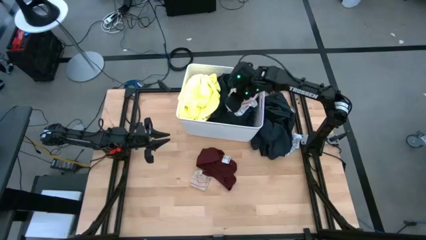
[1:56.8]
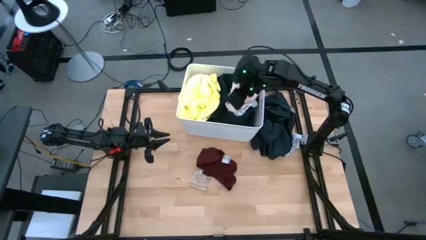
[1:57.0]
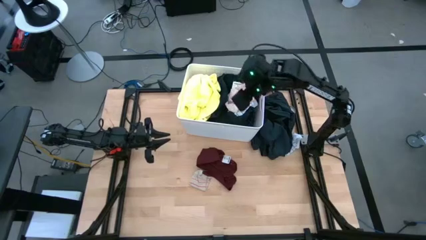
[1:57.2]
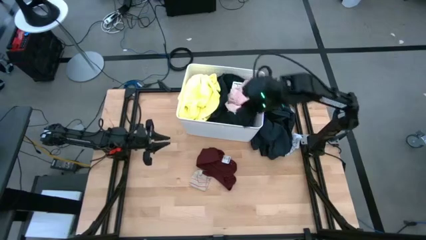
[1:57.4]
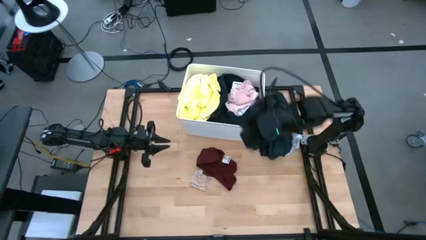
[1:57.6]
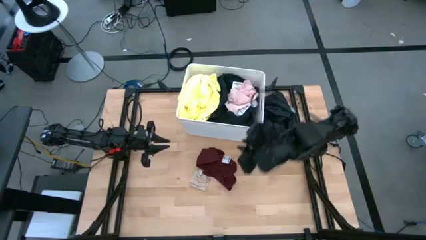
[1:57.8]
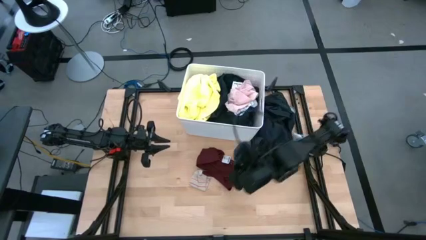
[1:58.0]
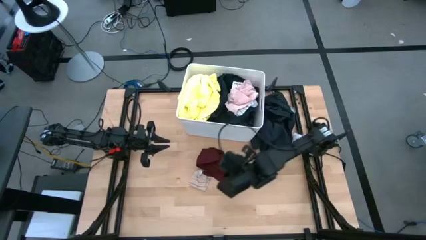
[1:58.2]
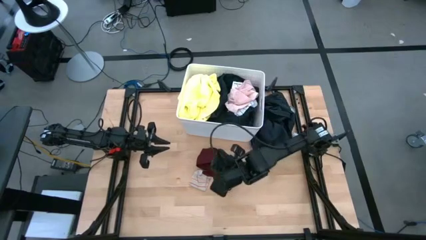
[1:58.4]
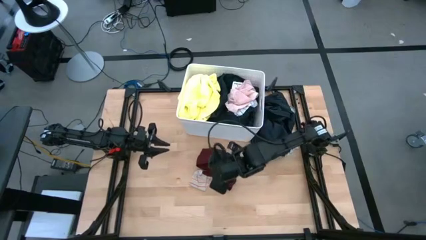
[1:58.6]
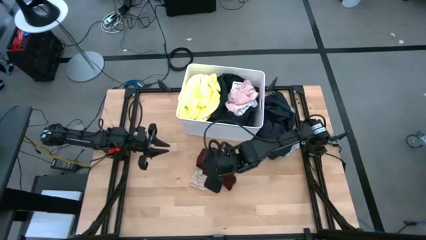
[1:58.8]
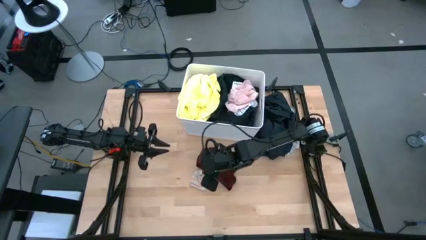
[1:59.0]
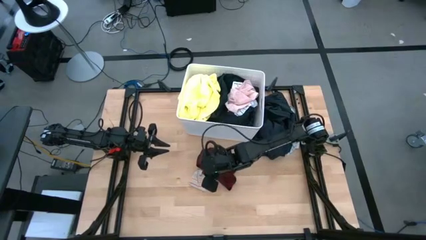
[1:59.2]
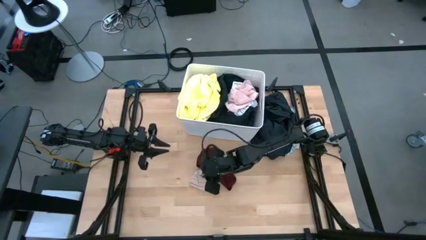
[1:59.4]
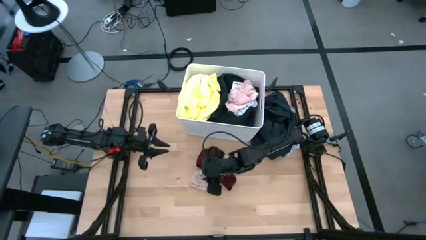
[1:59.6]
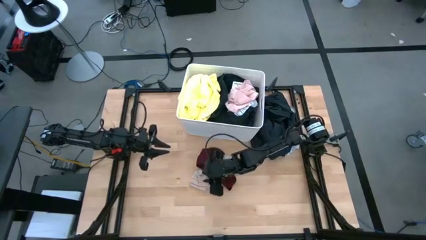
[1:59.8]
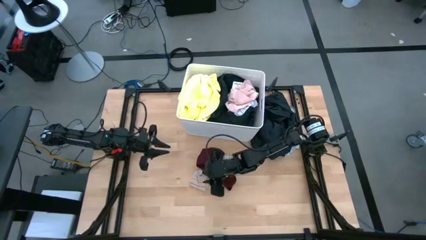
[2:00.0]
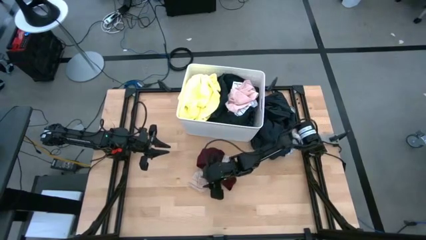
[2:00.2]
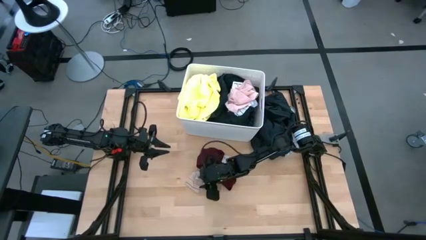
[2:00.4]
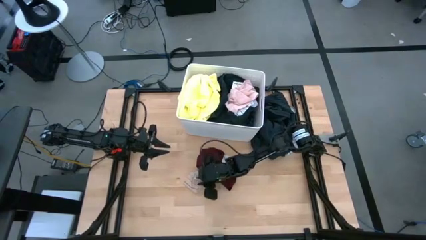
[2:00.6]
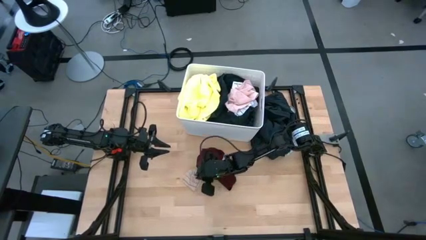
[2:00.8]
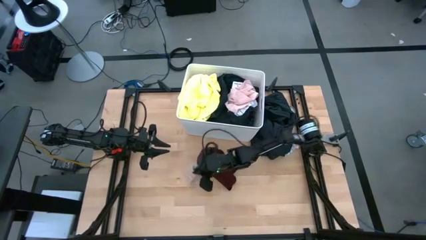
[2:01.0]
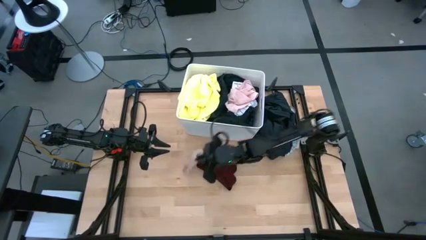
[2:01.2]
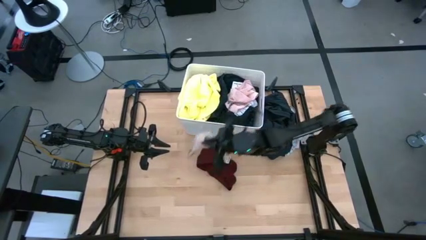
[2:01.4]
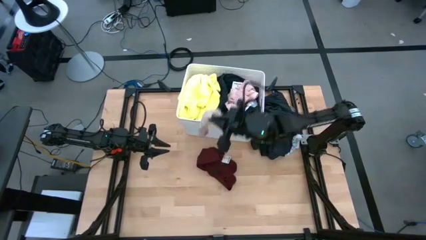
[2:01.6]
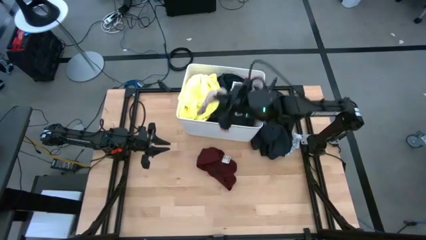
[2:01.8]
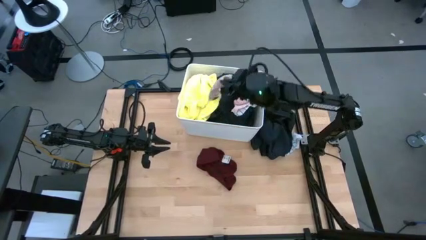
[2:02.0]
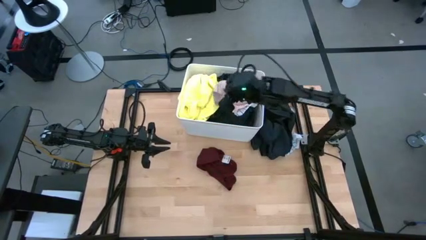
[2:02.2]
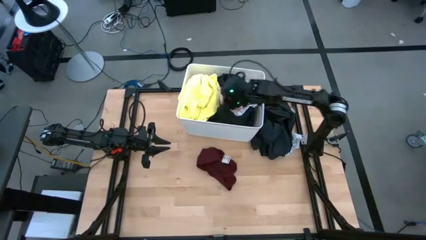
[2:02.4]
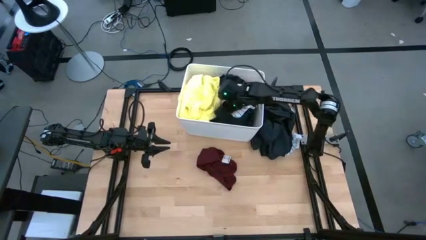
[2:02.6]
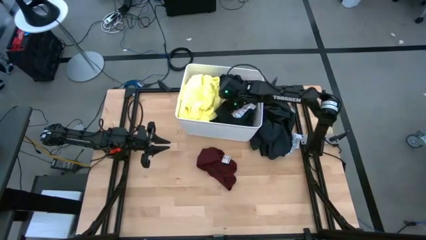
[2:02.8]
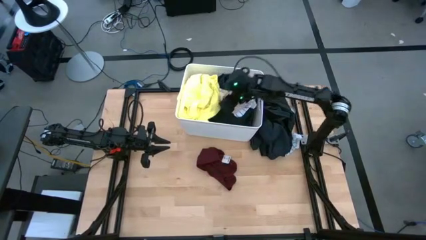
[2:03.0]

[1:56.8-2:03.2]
Task: Sort clothes
Put the white pink sock into the laundry organizer

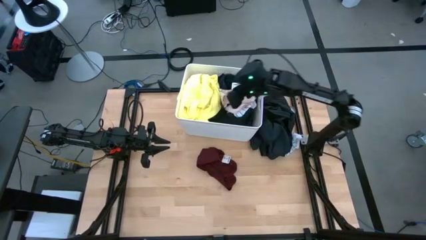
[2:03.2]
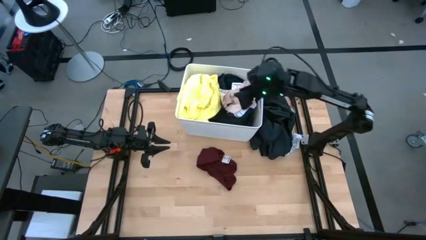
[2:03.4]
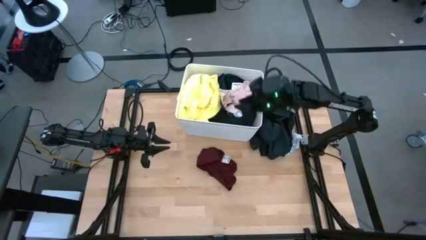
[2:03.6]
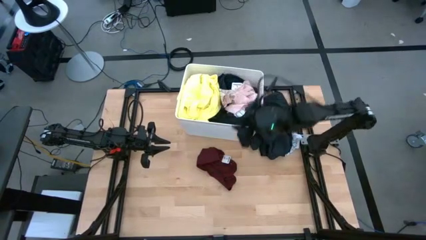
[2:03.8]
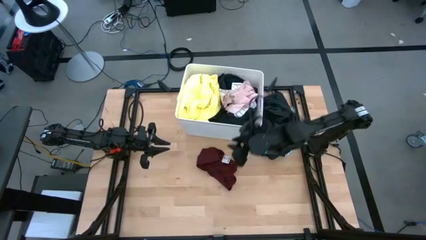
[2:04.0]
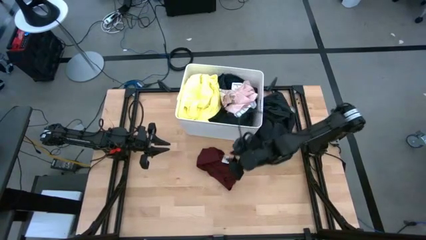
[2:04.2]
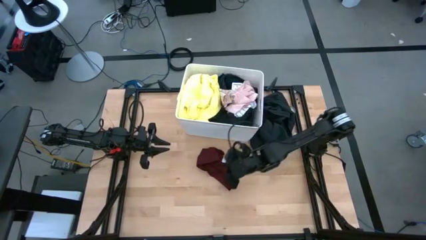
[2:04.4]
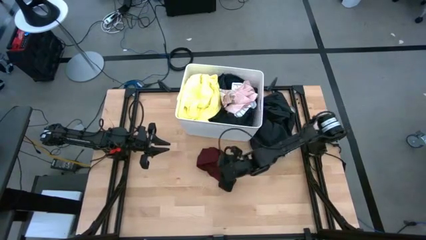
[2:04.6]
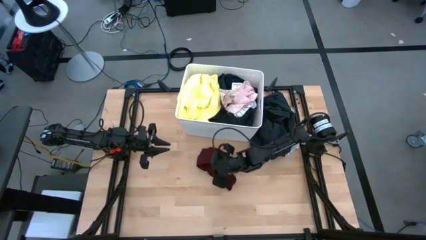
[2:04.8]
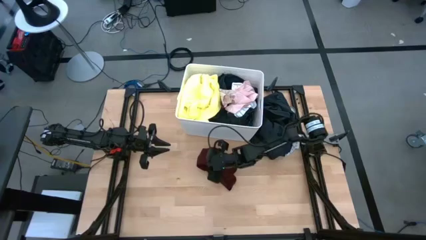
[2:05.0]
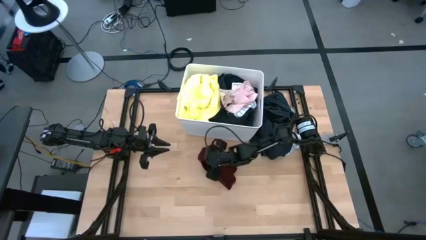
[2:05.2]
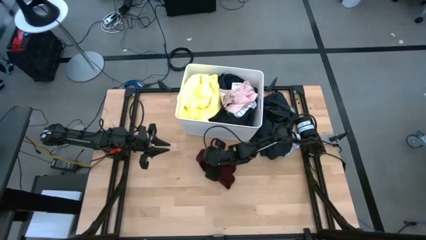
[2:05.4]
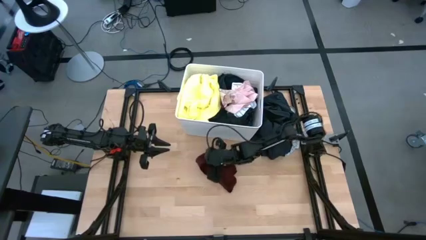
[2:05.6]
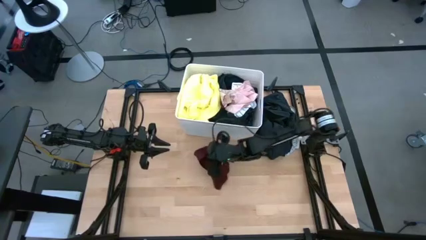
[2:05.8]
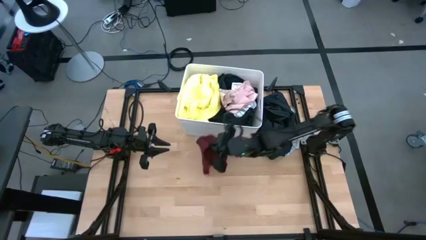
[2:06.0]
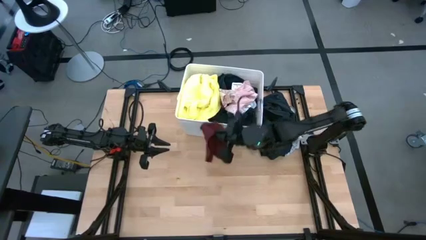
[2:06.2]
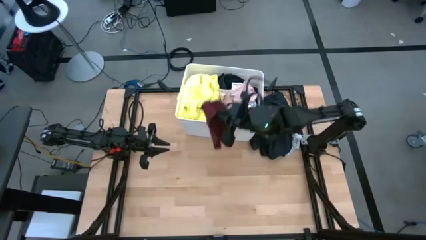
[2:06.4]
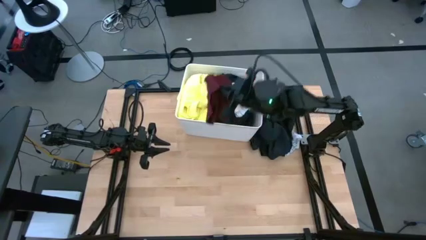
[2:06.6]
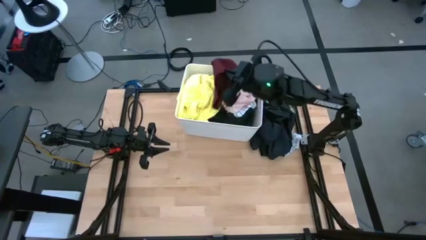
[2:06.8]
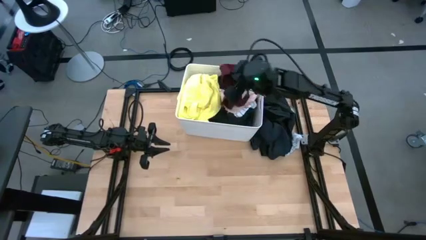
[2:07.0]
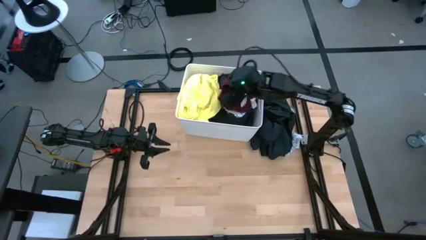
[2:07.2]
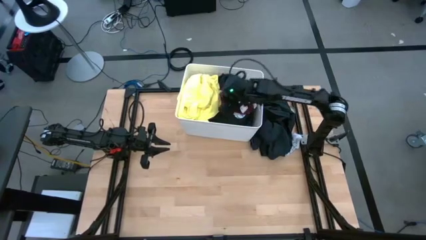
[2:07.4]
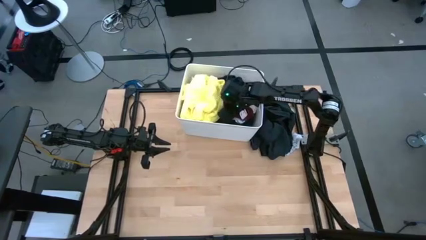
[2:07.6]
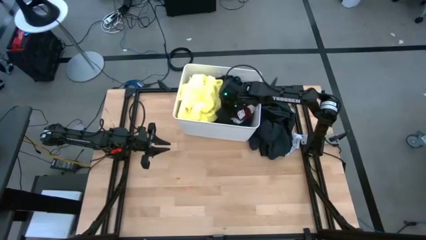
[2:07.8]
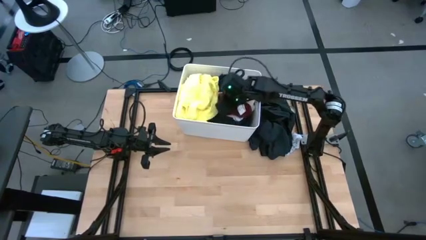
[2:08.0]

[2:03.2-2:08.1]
Put the dark red top into the laundry organizer

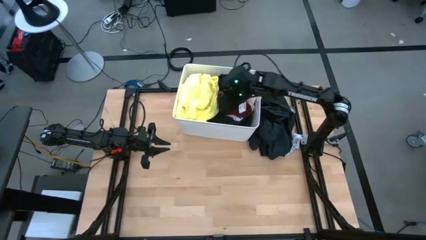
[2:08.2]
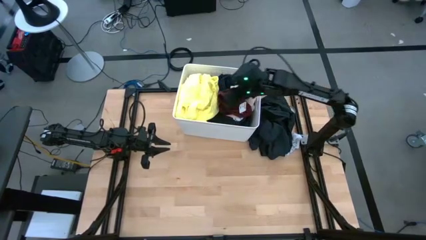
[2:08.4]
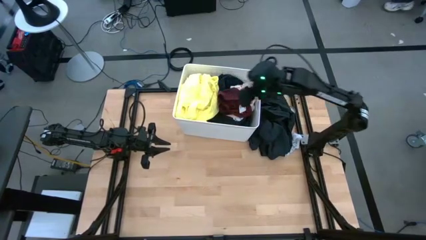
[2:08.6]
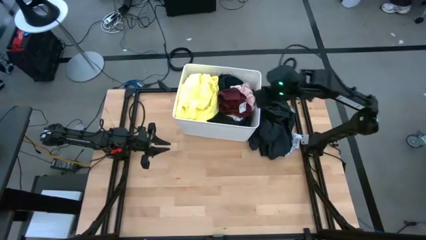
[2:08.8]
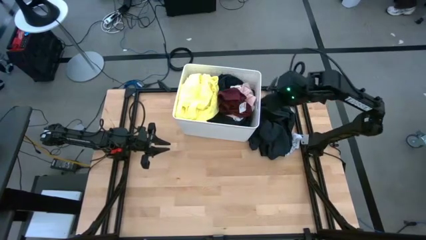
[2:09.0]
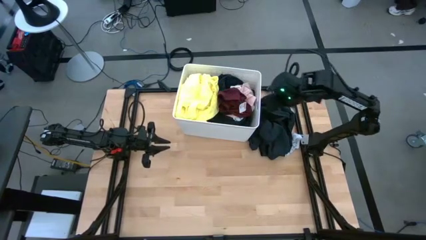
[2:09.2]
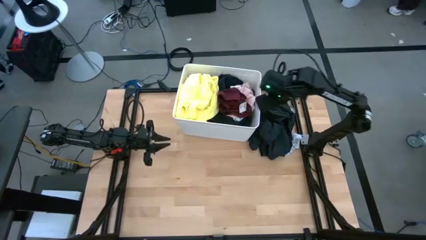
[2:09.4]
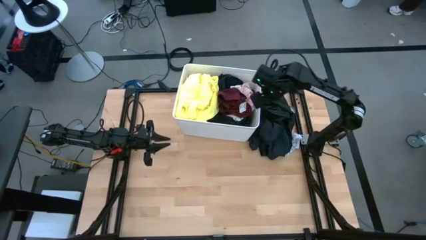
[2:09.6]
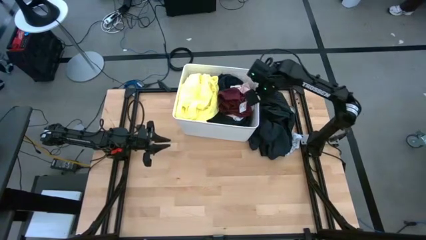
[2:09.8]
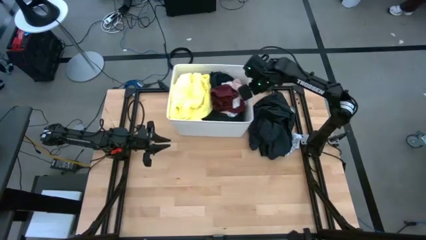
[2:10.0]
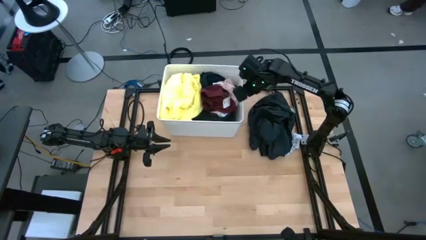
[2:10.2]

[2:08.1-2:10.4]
Adjust the laundry organizer

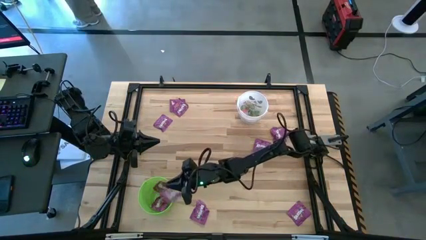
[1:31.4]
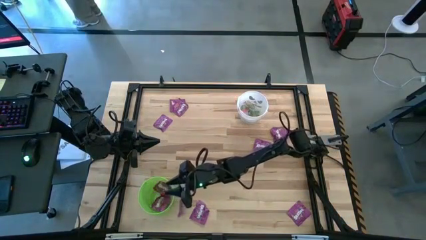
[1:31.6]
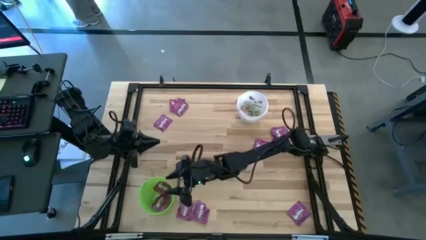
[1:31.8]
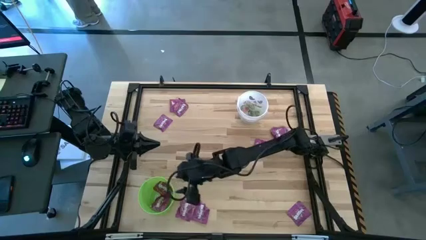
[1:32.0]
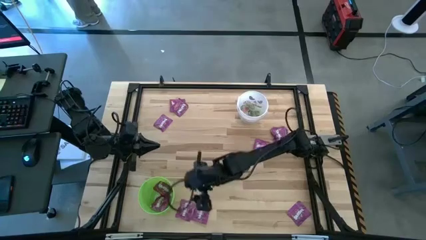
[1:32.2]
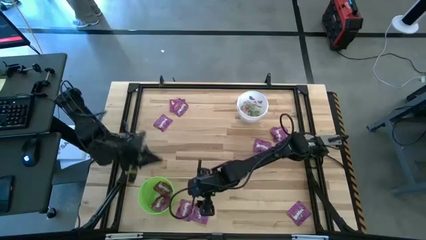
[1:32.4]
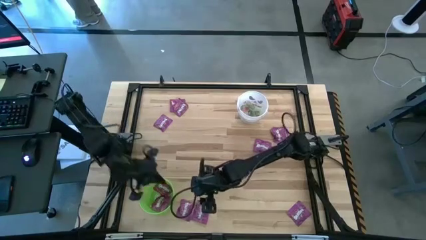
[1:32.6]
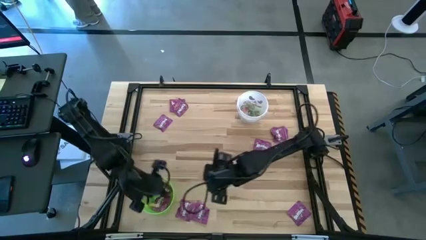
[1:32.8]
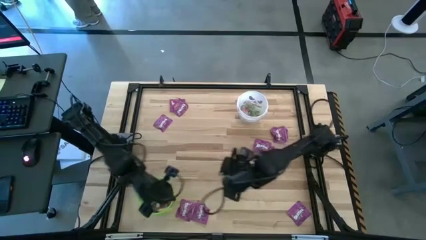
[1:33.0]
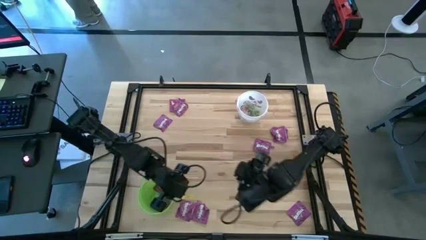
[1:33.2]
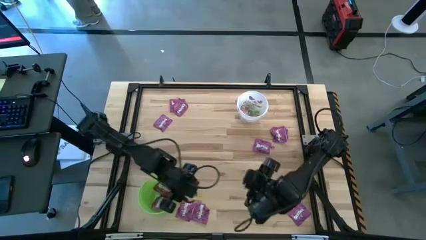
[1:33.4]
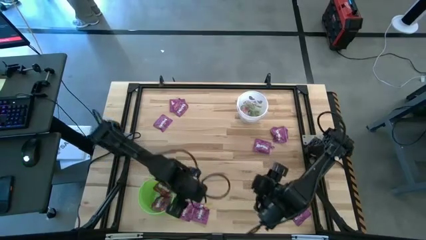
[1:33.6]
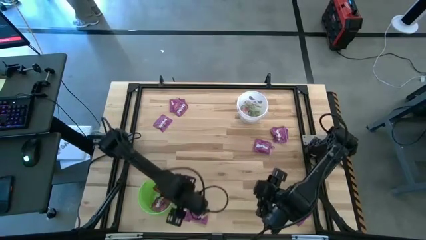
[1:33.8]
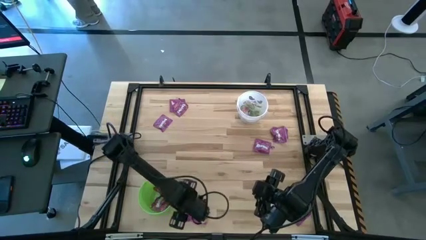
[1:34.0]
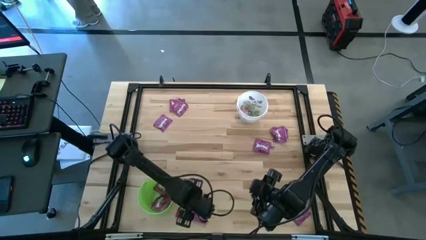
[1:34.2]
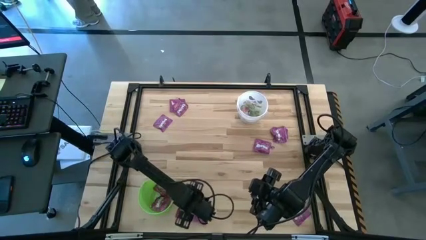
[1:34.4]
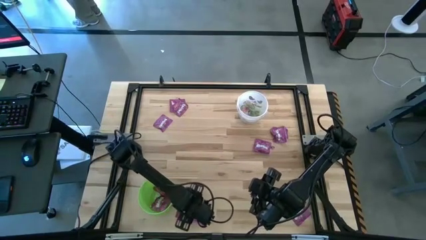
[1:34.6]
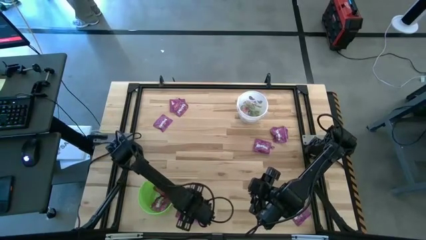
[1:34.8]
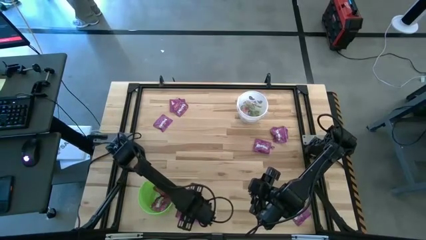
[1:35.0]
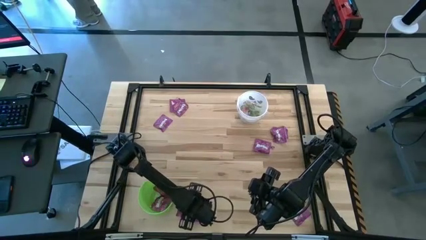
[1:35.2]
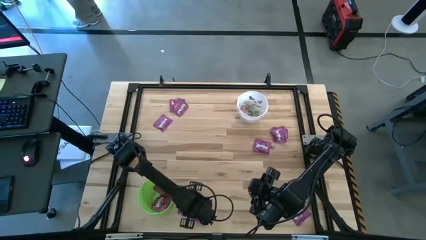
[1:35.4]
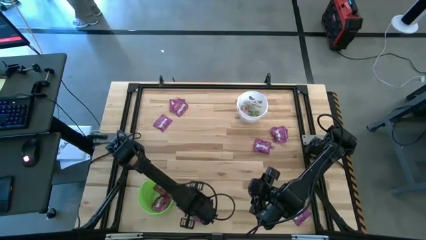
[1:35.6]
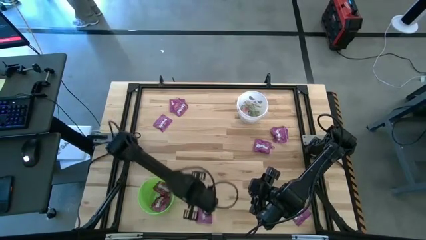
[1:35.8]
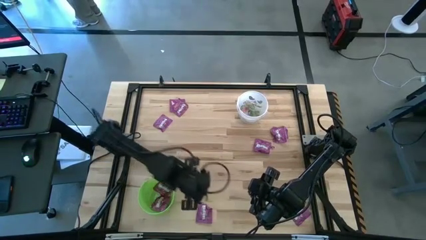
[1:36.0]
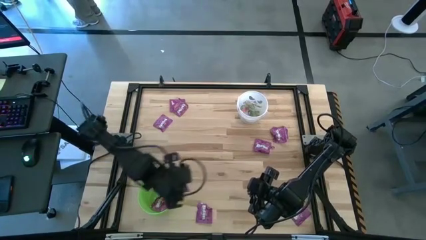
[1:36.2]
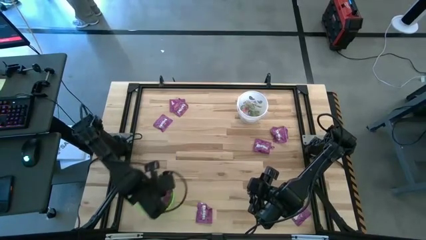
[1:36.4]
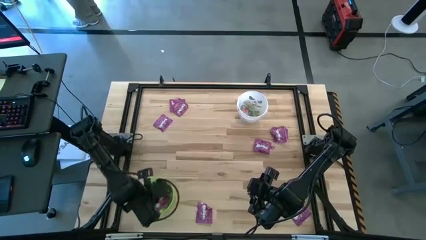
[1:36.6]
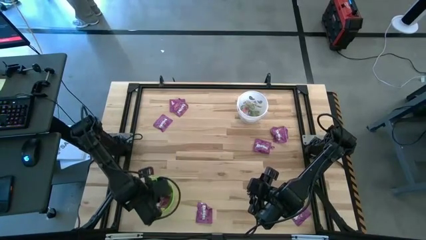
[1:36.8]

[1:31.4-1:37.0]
Task: Sort candy by brand, put in halloween buckets
Put the purple candy into the green bucket
